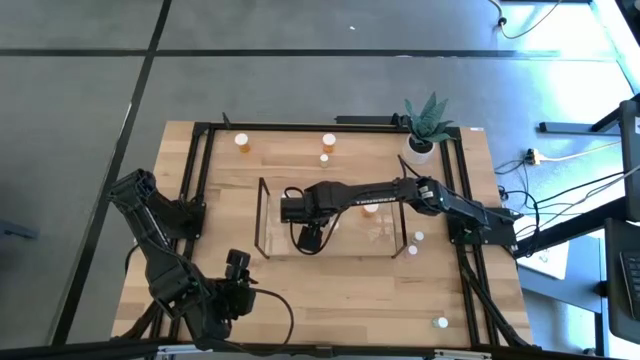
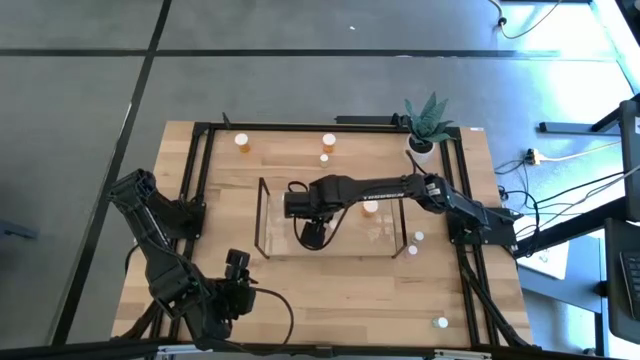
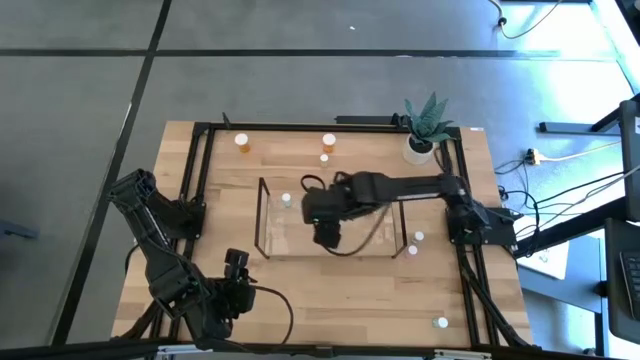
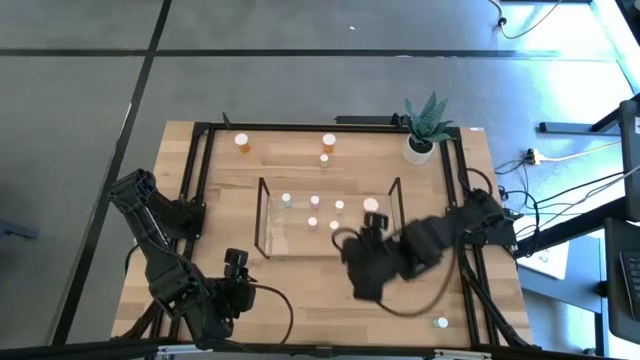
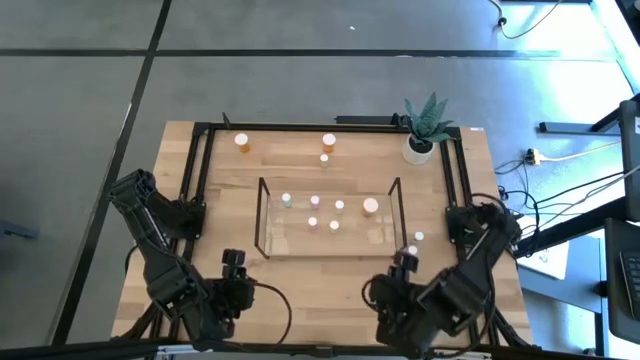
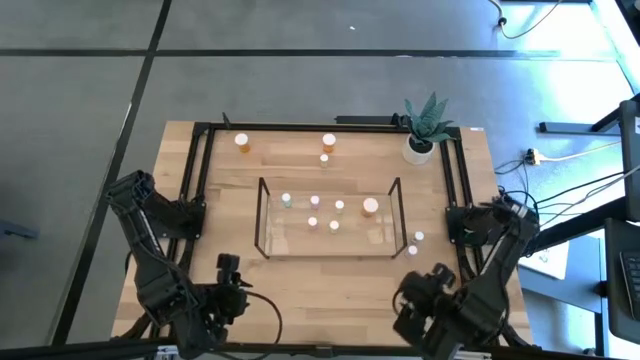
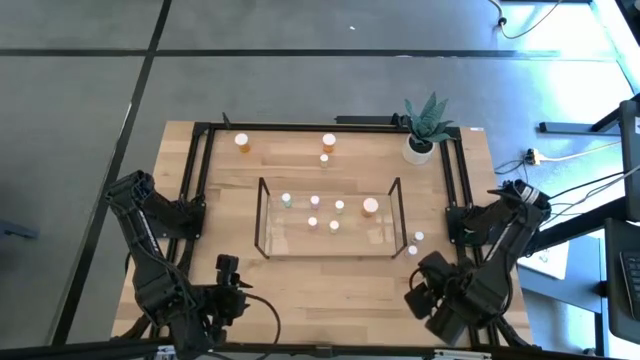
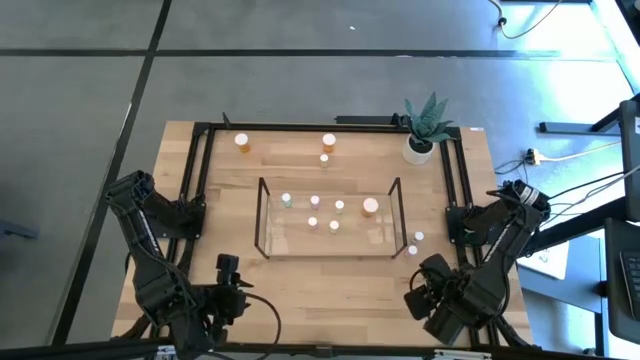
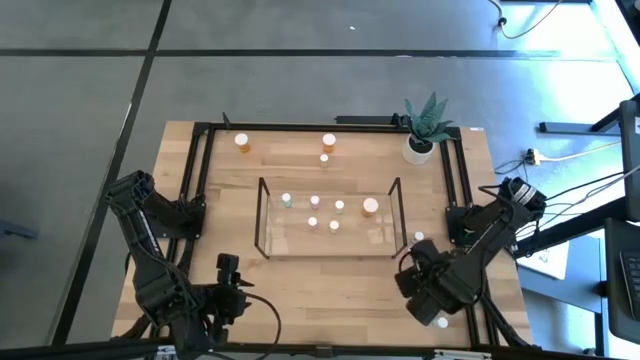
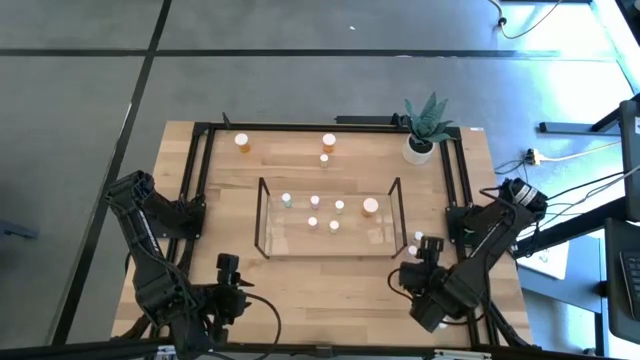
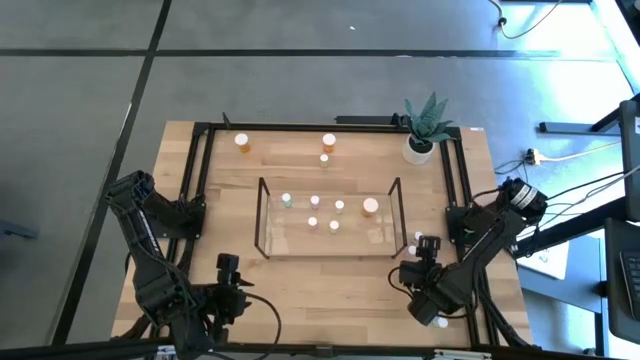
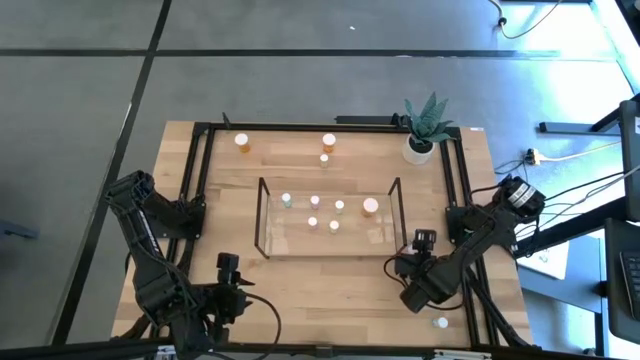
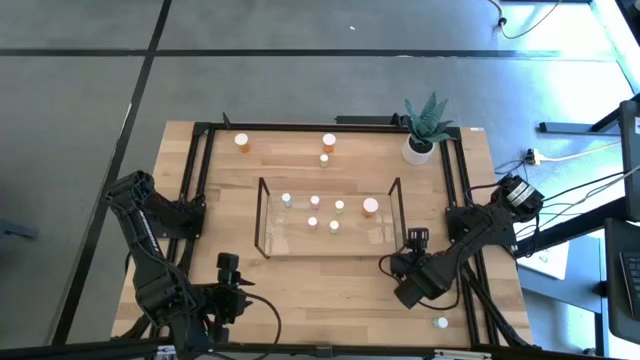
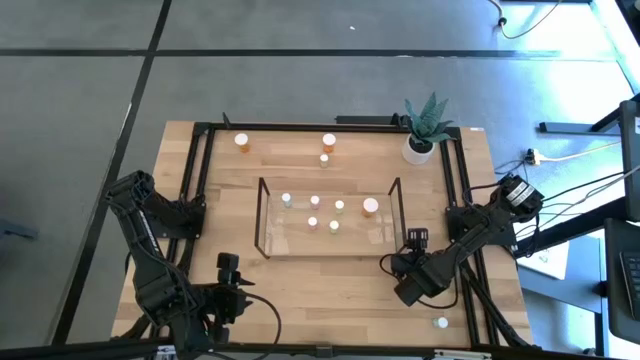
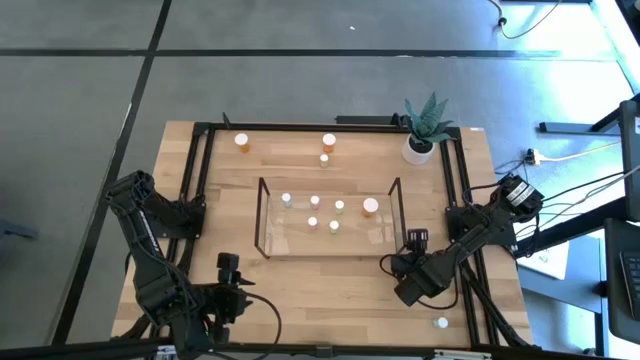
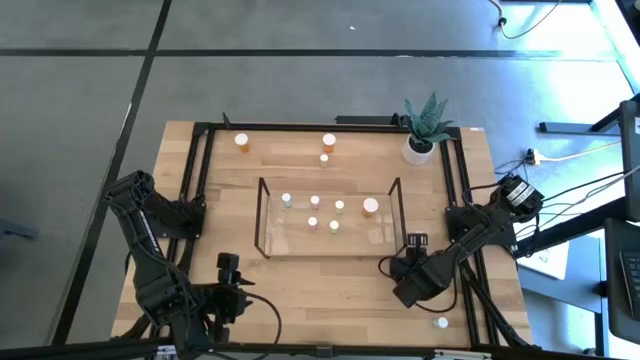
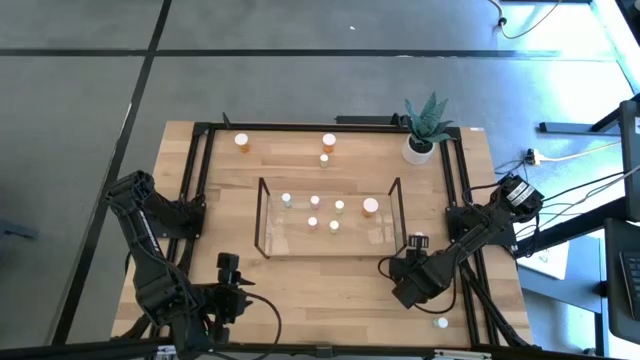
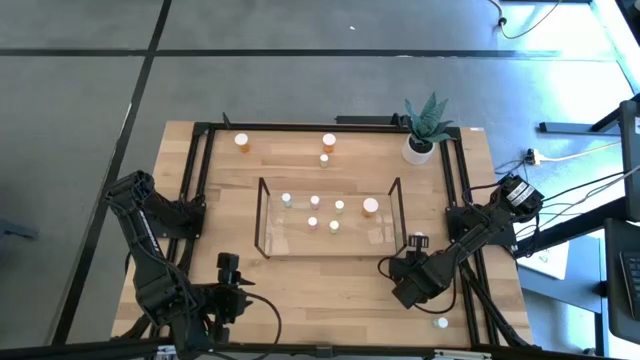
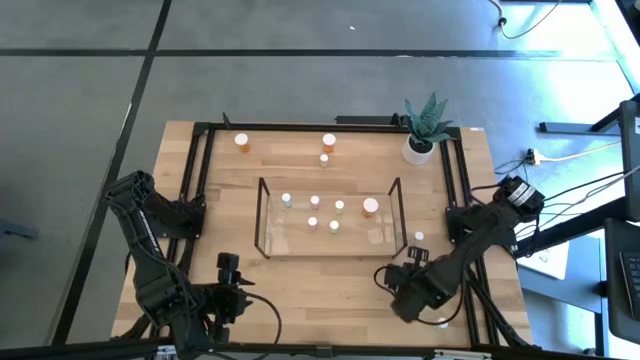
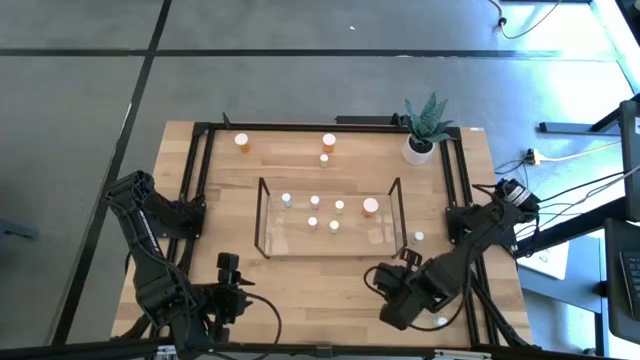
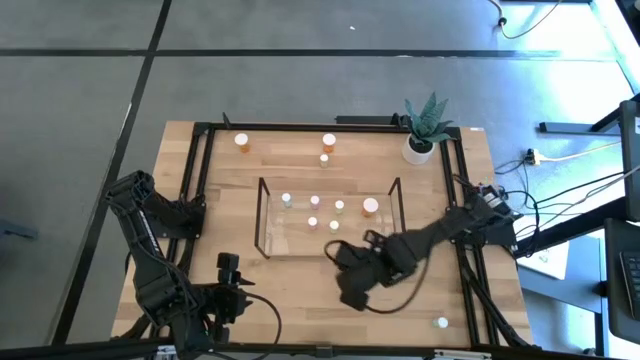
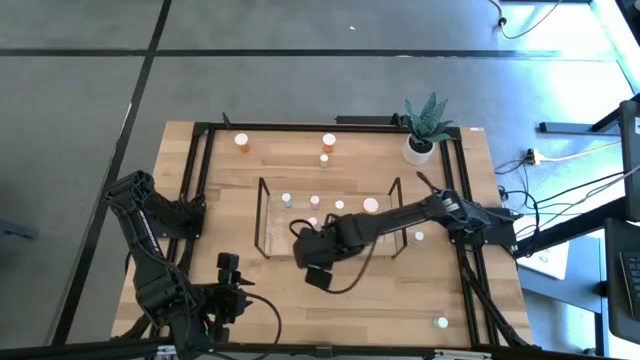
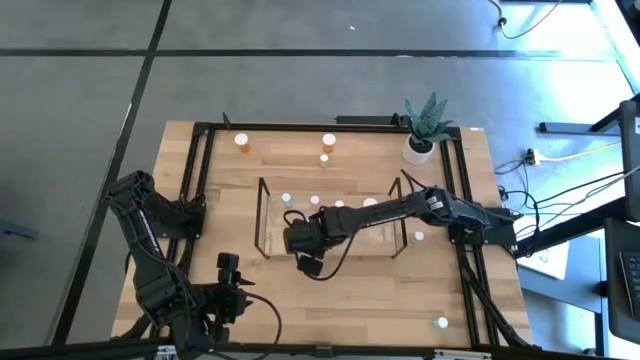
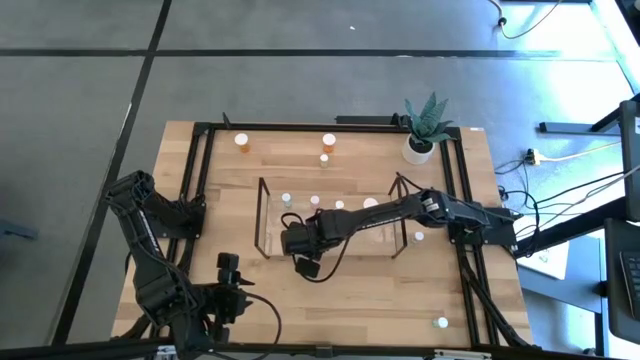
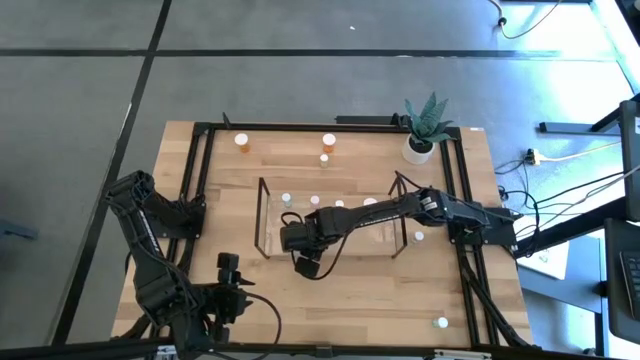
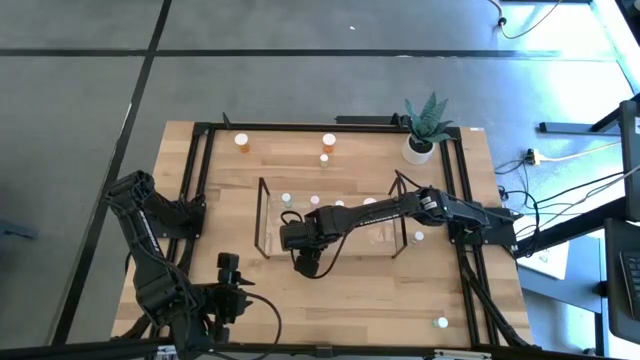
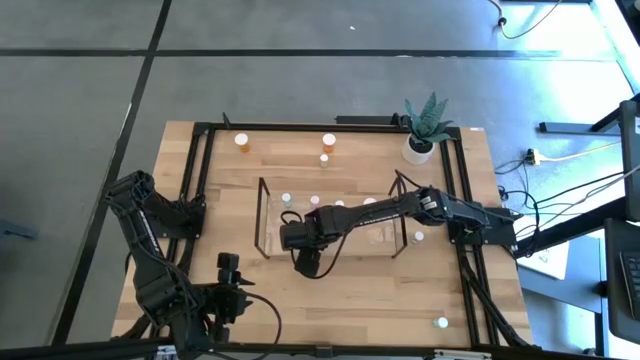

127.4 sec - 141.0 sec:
Task: Pick and place medicine bottles onto shelf by color
Put the pink pill bottle on the shelf aligned with the other pink pill bottles

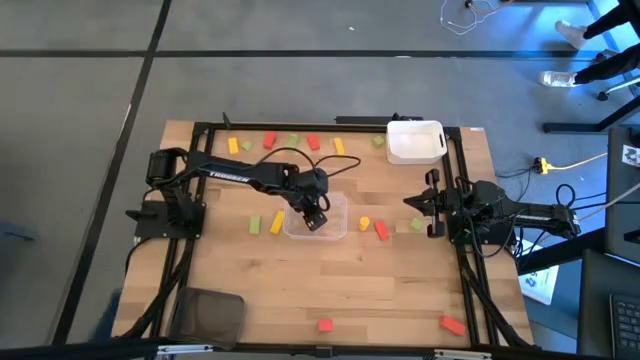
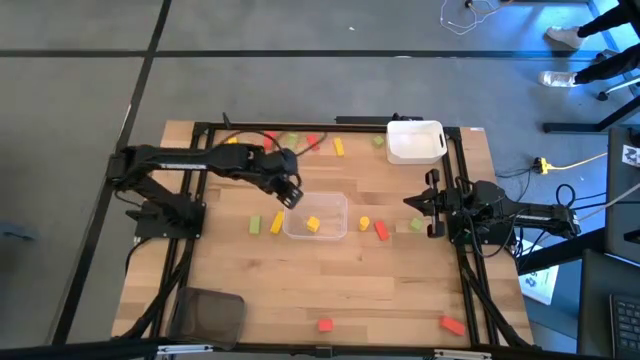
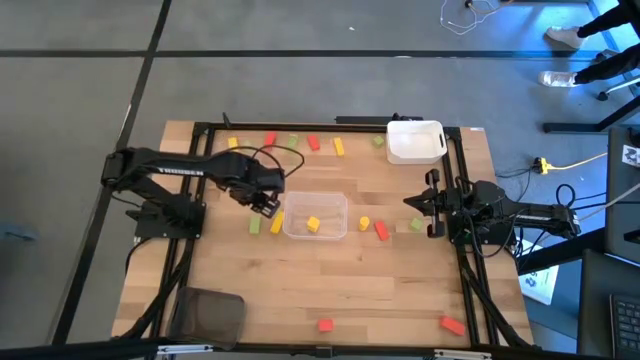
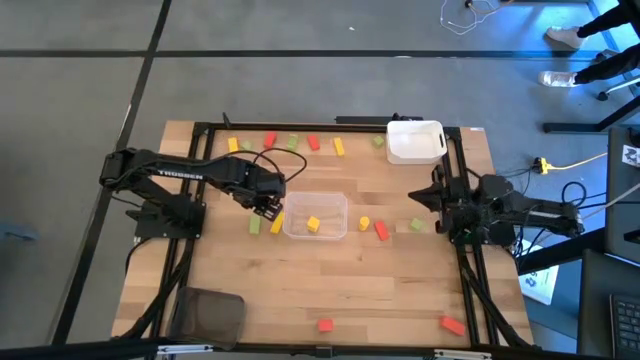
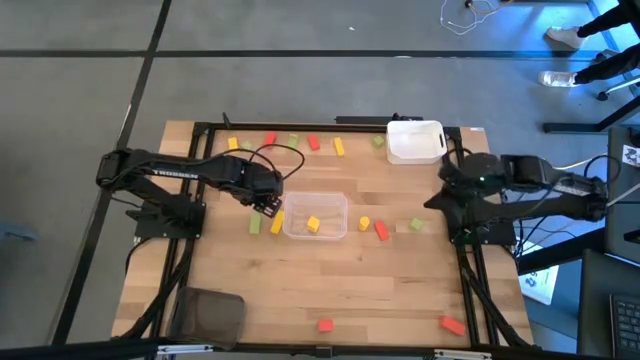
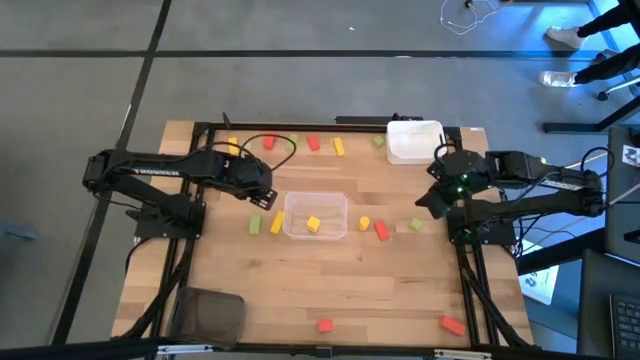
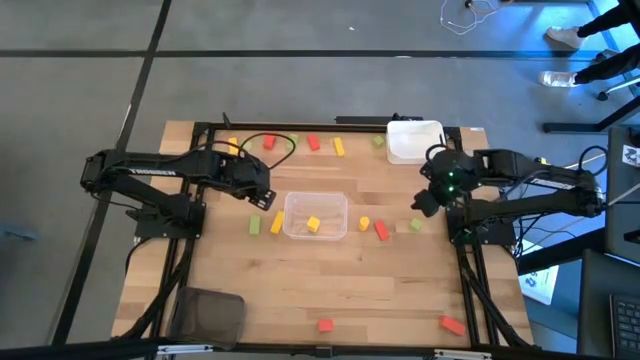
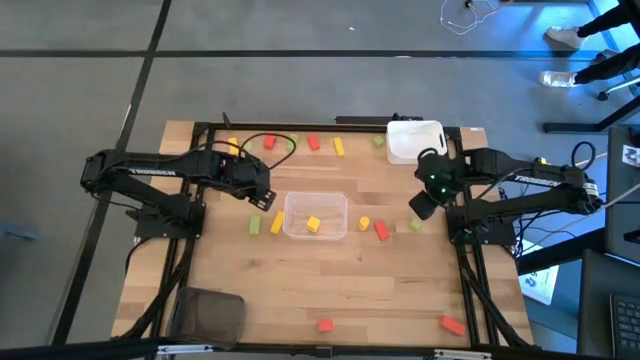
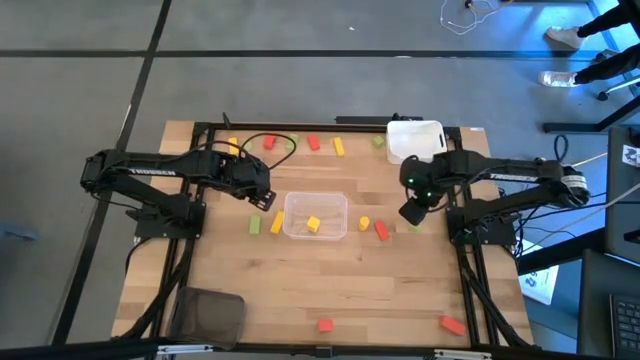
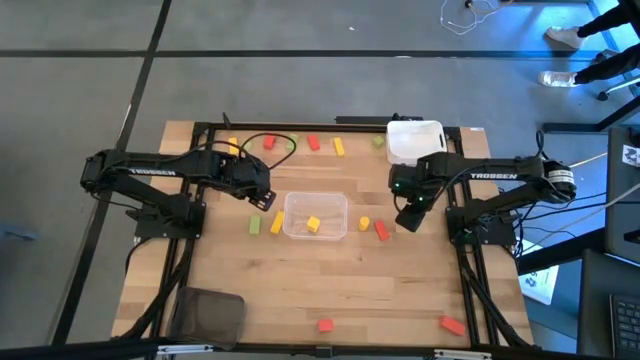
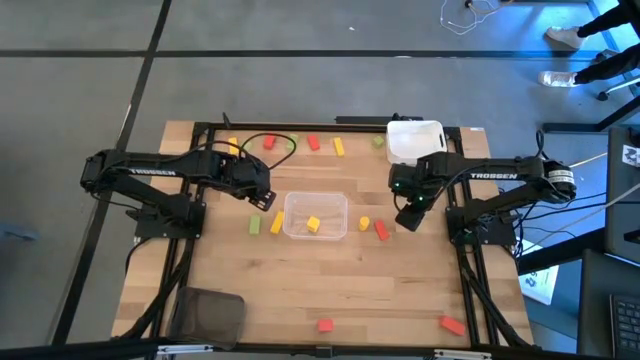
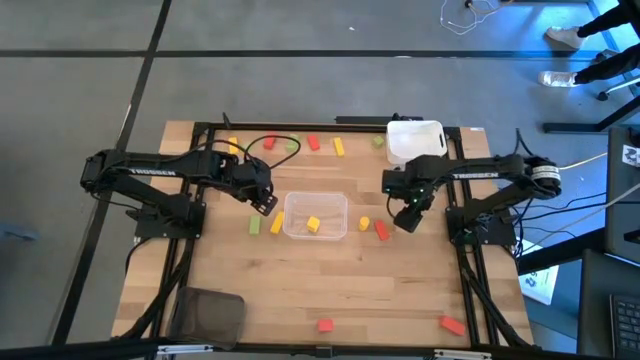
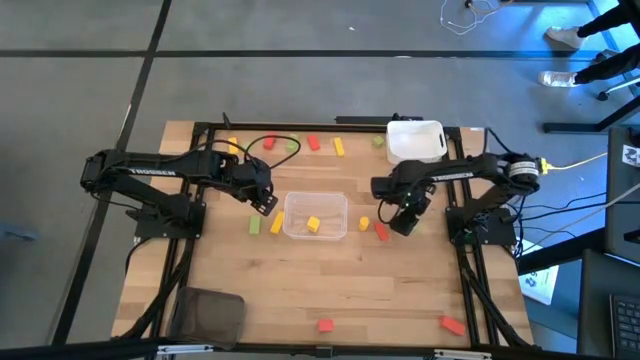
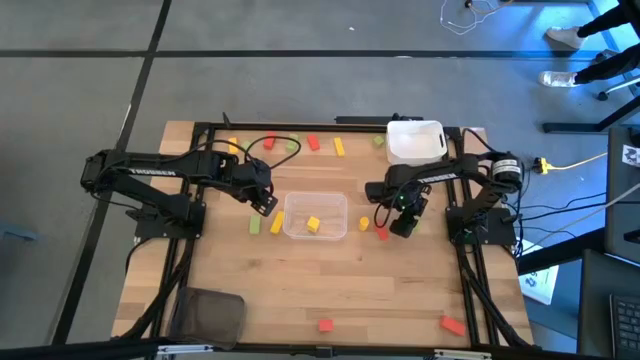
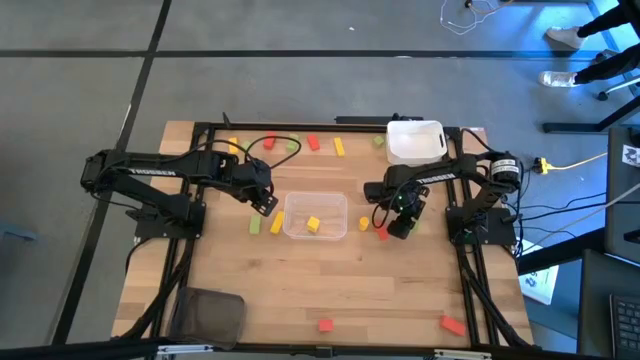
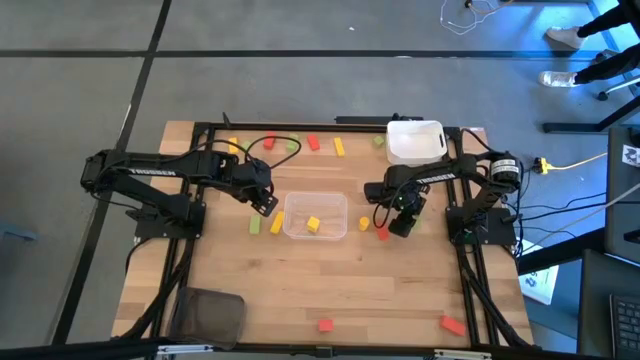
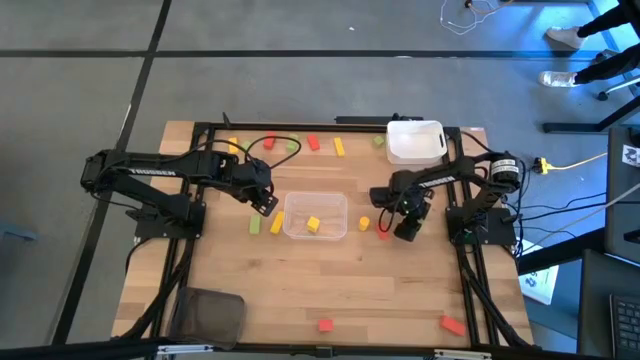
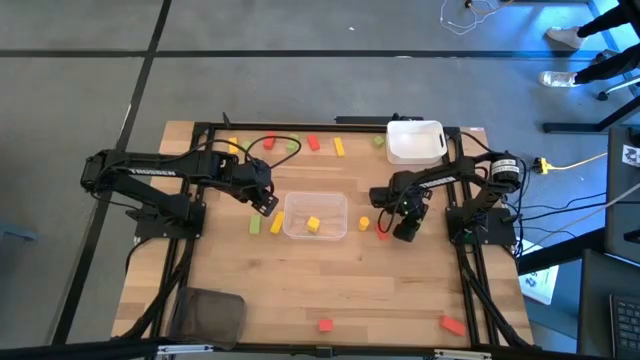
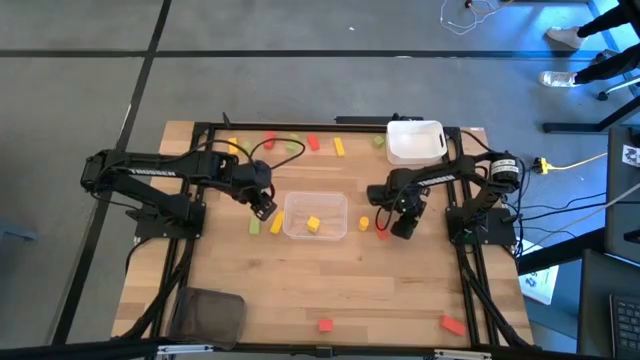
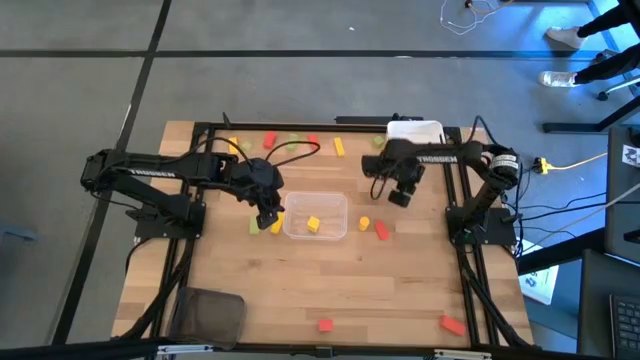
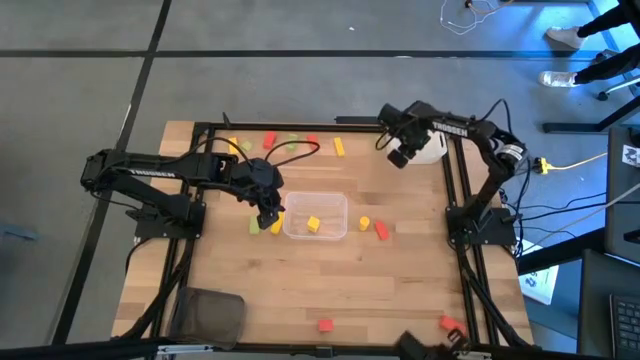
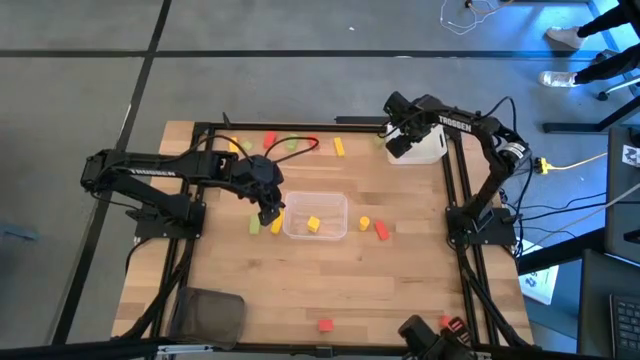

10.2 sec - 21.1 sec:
Task: Sort & place blocks by color
Put the green block into the white bin
